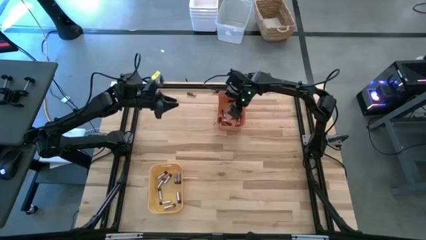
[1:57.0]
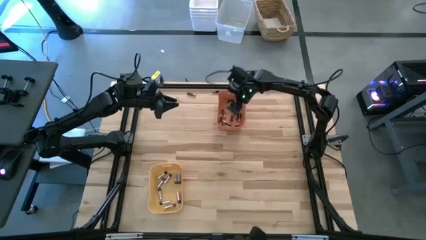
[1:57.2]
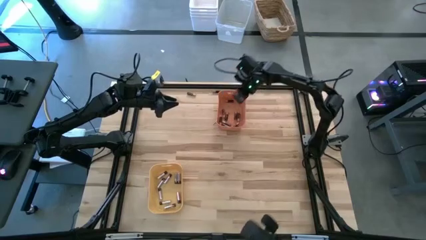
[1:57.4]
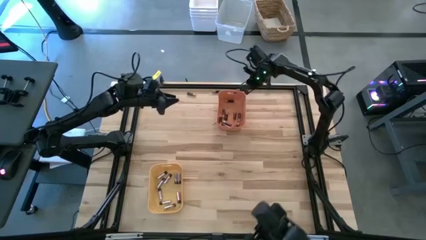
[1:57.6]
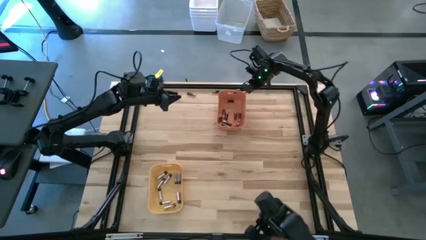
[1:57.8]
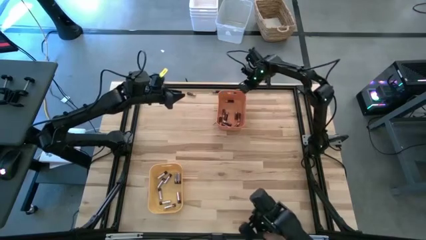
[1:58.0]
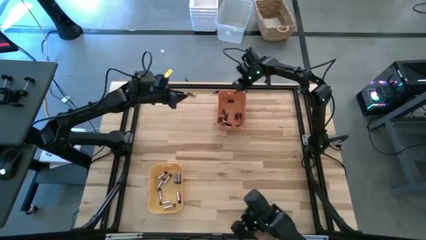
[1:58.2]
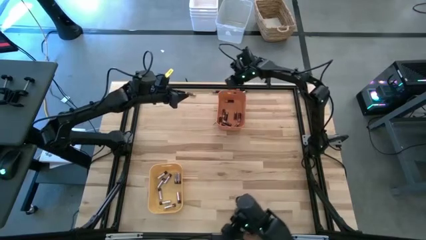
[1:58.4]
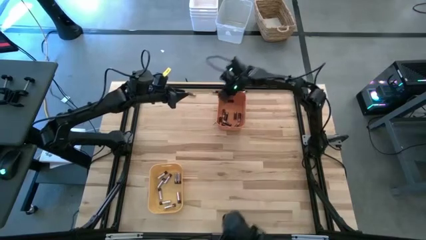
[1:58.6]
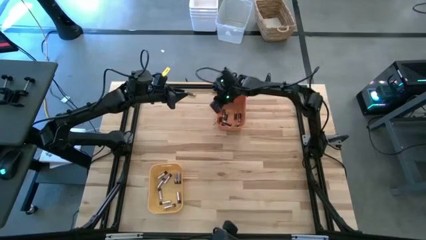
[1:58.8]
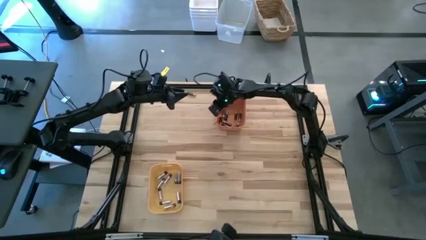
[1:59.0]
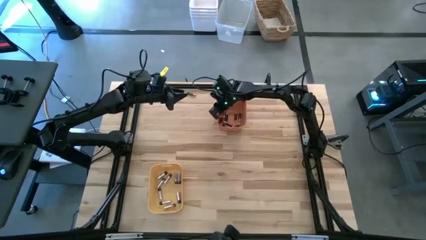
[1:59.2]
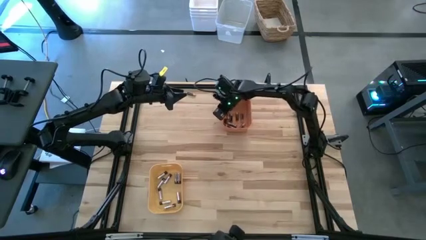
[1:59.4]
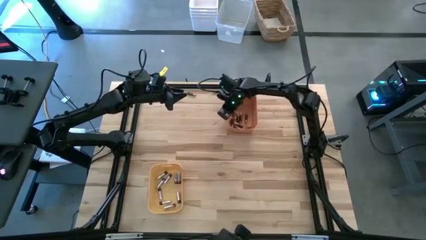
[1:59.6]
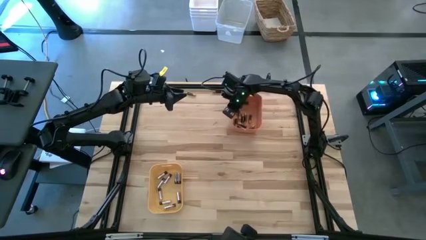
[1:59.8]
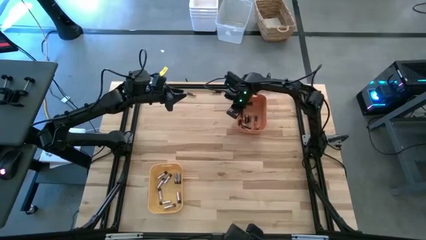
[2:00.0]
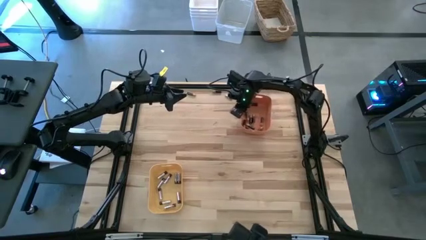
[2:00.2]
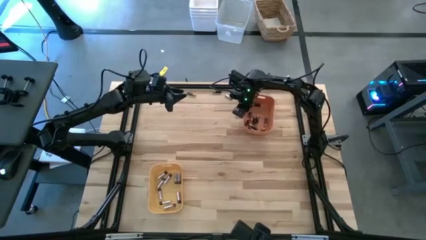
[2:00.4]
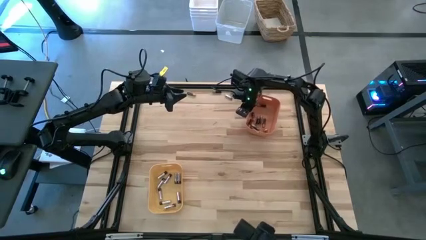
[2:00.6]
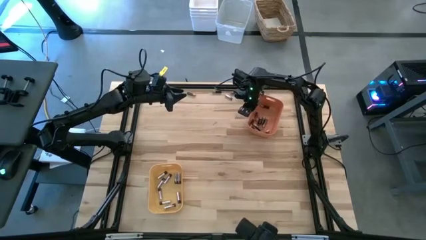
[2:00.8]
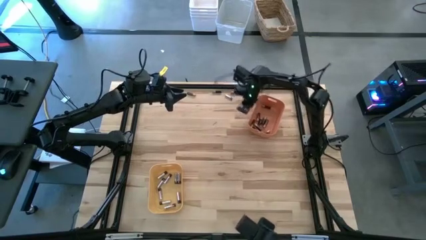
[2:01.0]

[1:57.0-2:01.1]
Task: Sort batteries
Adjust the orange bin

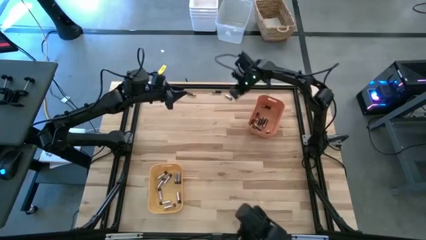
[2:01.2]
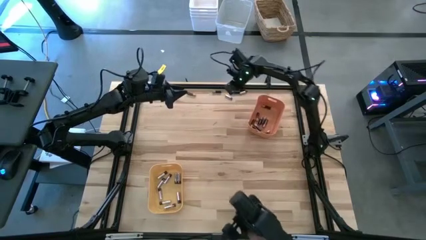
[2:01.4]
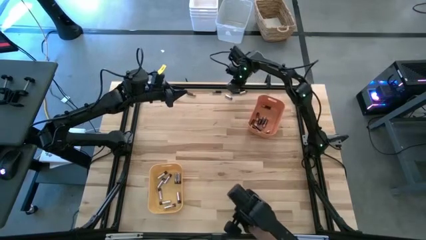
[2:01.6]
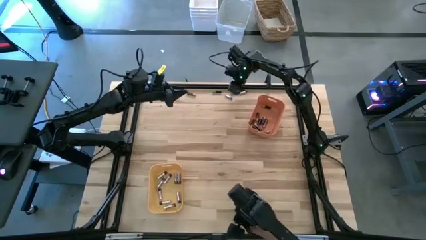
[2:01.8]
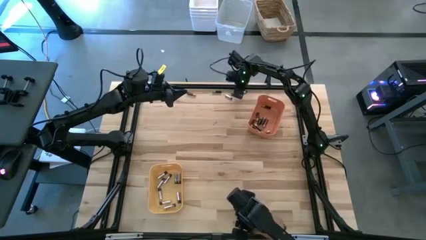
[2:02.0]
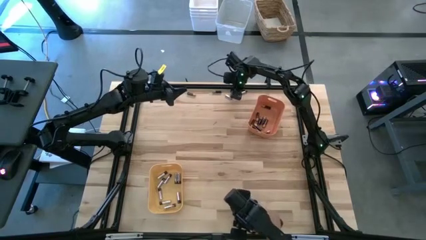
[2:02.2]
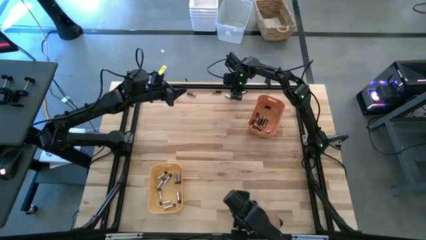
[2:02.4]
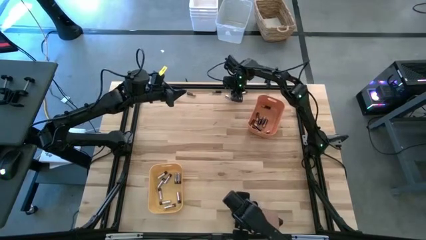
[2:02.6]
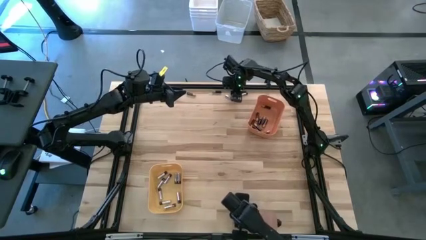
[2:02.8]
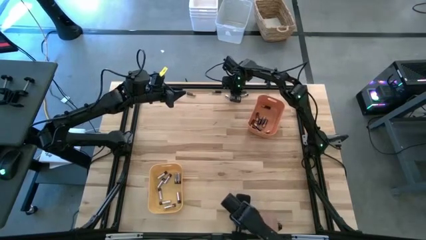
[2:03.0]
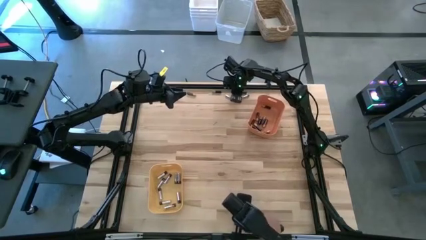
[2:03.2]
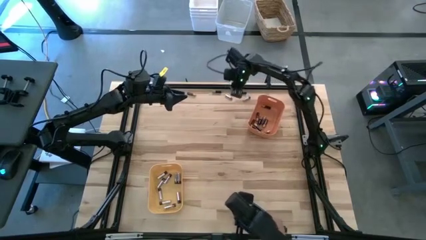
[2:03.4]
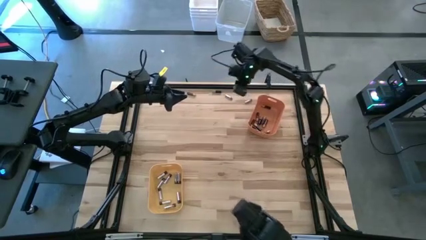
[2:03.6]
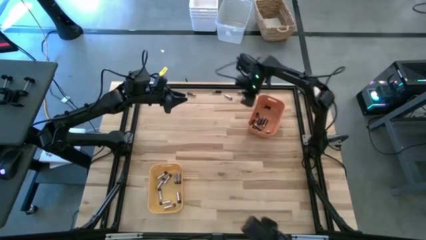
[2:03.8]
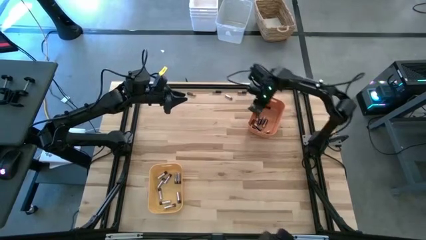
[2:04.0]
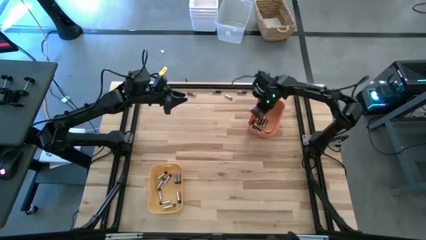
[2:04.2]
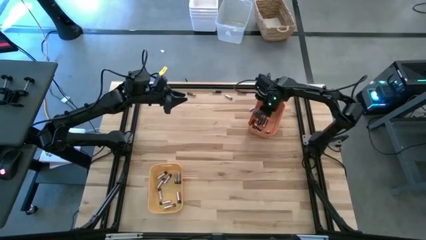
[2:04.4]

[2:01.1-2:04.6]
Put the black battery into the orange bin

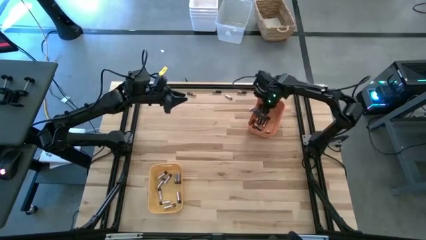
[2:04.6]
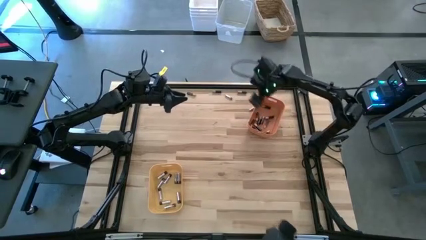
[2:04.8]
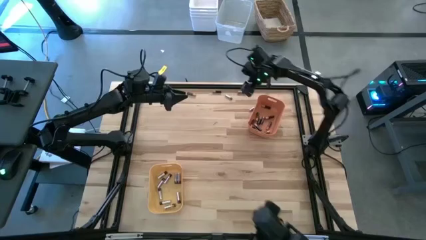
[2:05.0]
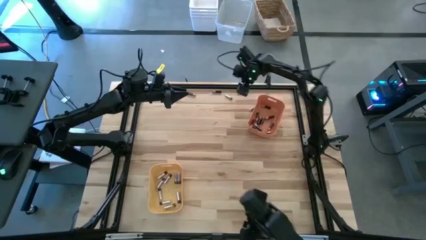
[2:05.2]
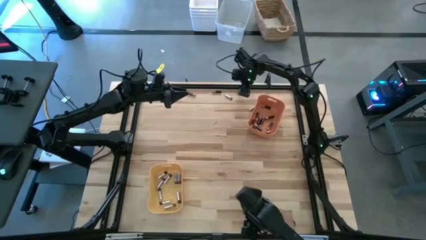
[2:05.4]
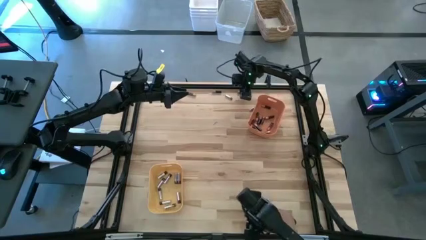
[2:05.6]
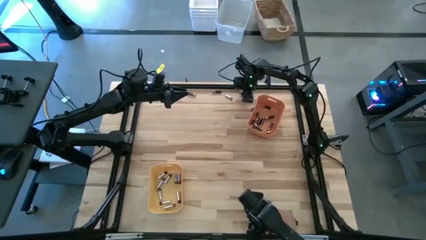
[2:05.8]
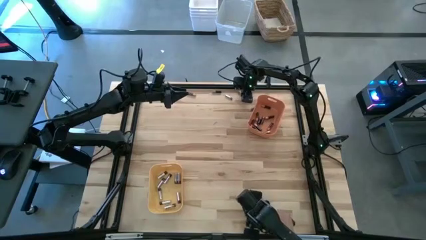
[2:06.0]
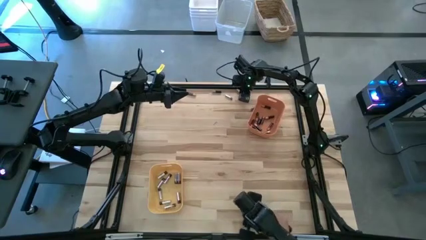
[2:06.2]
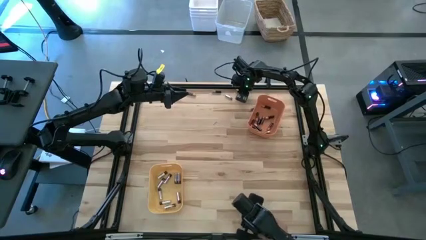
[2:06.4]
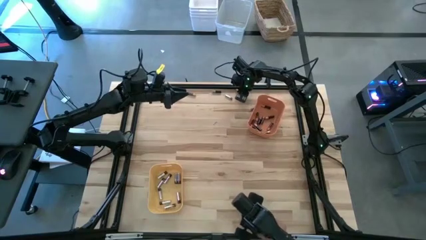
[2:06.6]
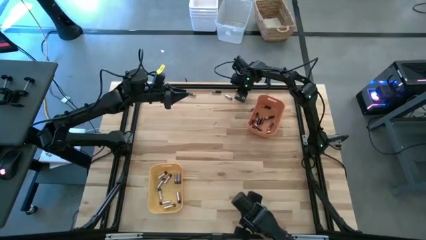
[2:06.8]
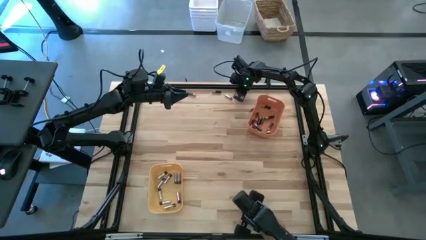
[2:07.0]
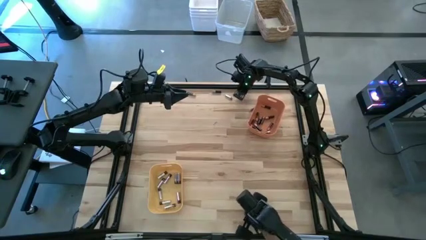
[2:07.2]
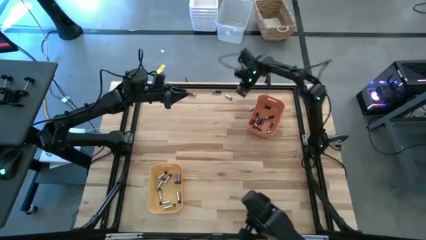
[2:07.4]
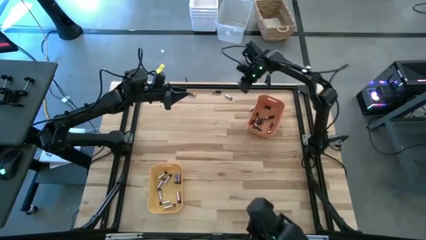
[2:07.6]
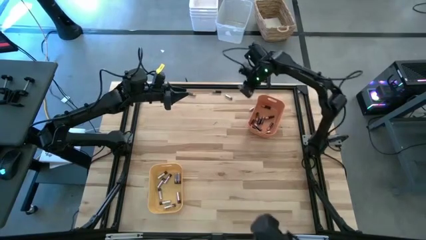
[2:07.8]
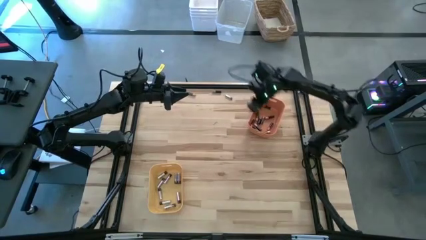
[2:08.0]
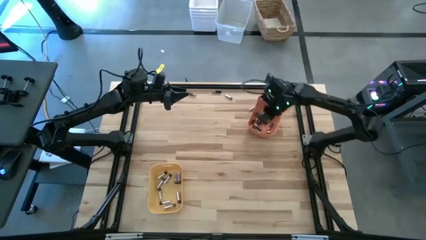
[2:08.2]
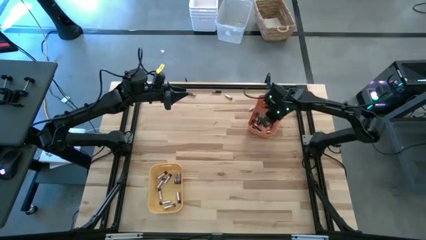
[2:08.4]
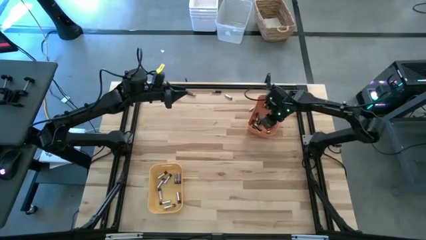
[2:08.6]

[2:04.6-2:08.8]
Put the black battery into the orange bin

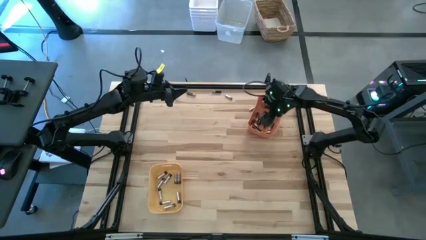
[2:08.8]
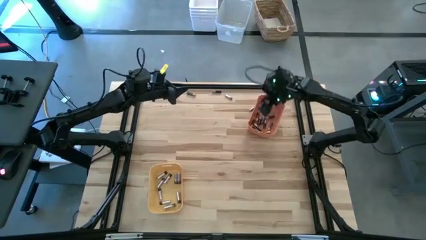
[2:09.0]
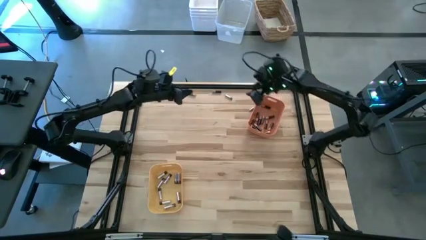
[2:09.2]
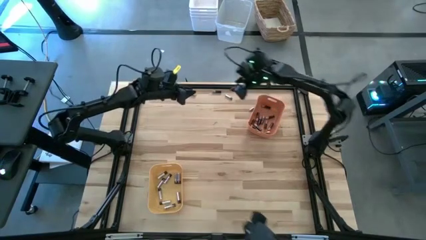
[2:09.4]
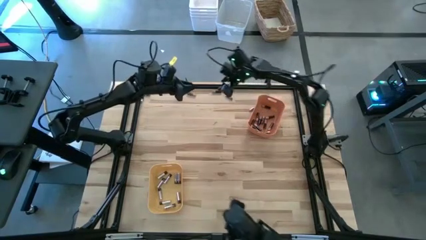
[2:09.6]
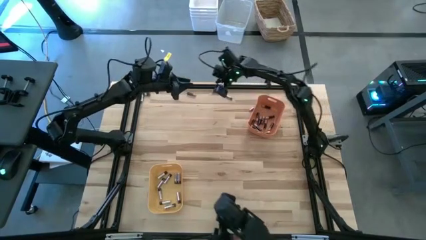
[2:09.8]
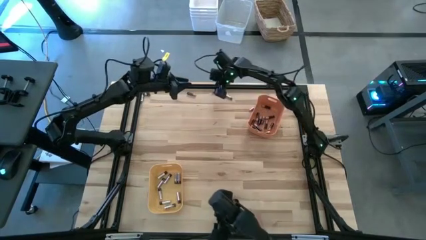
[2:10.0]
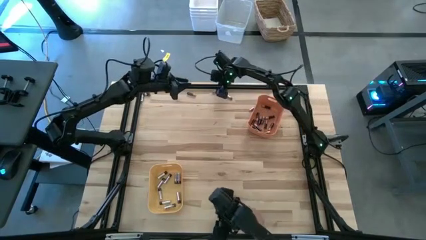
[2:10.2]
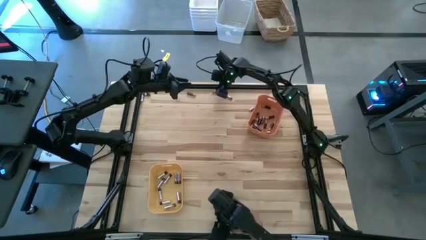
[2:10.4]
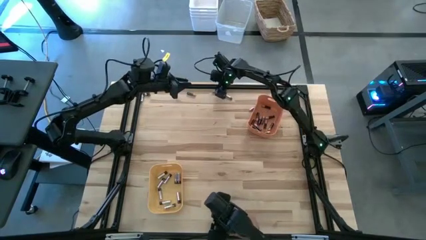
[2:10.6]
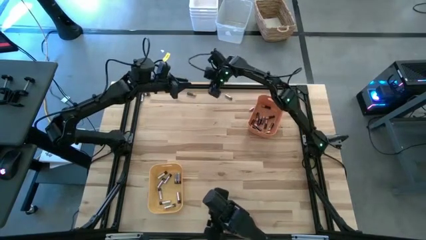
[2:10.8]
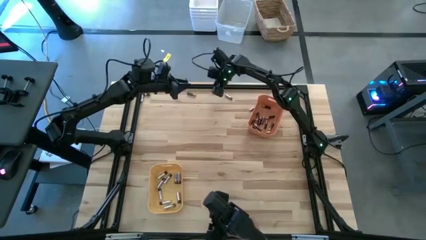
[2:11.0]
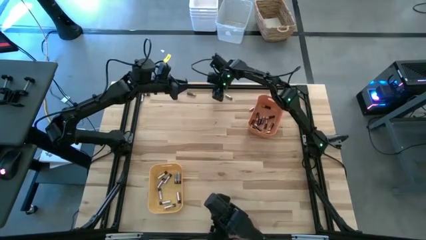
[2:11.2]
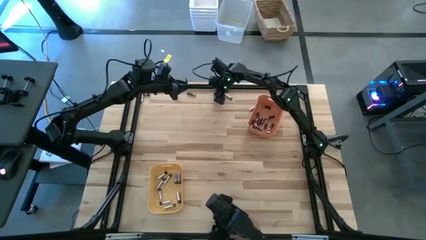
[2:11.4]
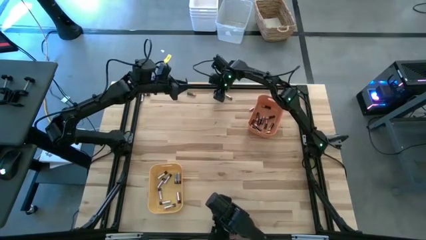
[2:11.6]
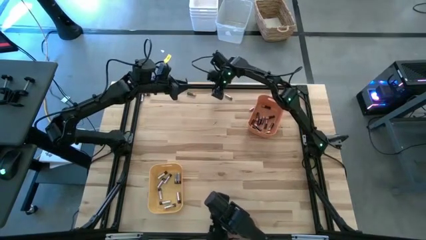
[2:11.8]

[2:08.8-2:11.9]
Put the black battery into the orange bin

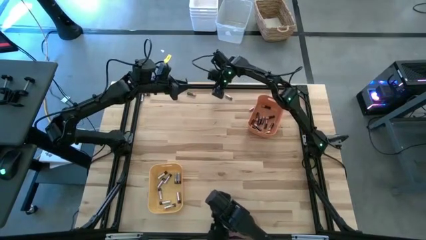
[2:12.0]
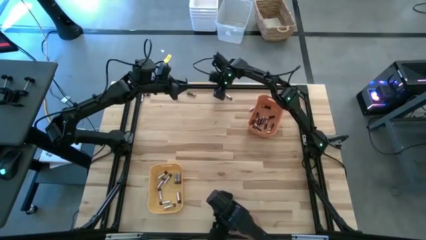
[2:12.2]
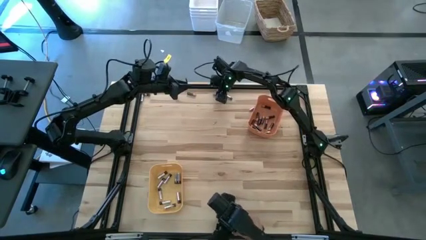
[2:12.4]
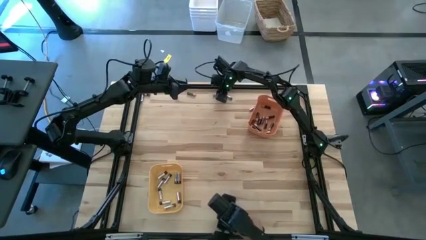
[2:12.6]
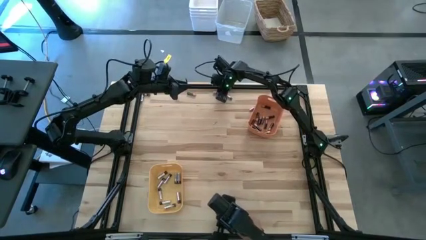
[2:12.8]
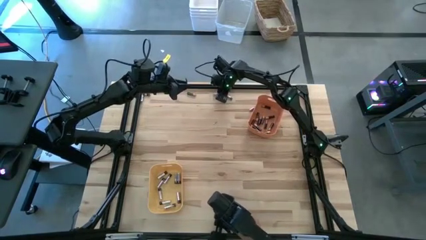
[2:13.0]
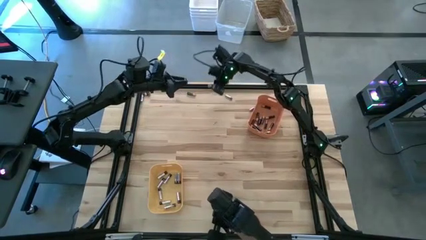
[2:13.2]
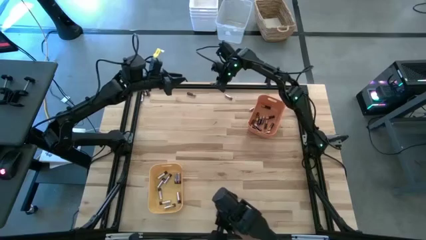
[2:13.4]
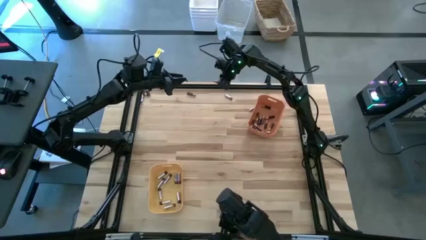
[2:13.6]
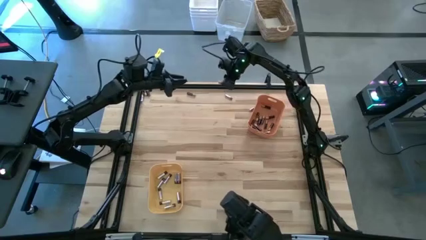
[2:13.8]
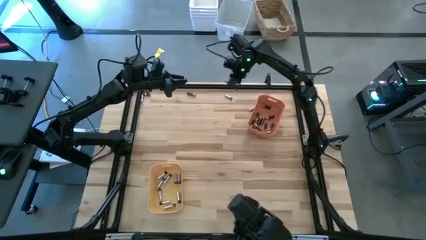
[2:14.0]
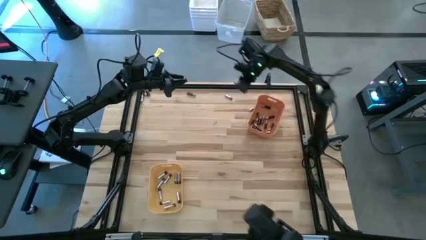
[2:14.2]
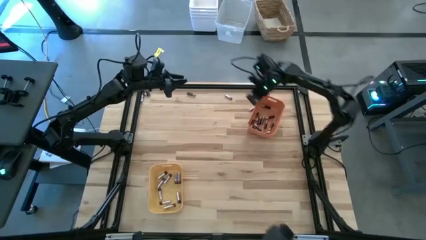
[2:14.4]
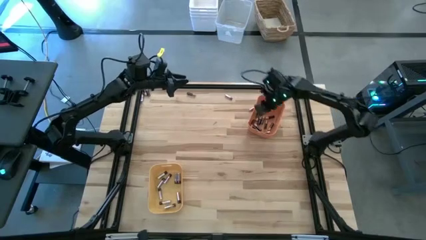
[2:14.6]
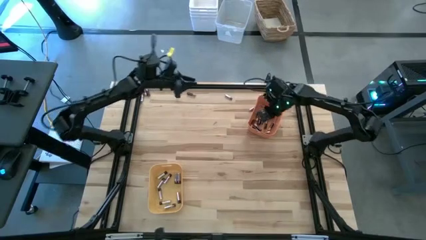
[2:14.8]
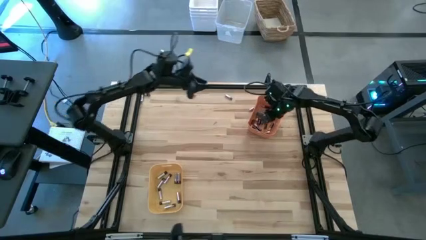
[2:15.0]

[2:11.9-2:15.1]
Put the black battery into the orange bin
